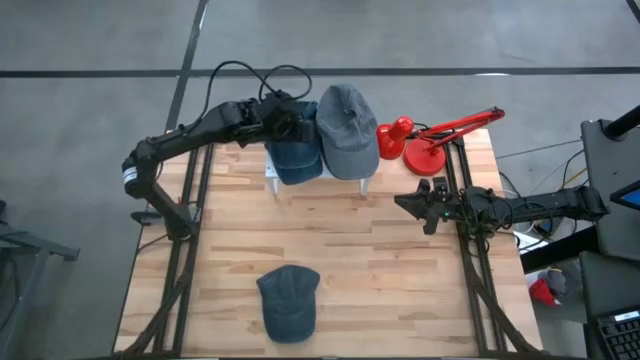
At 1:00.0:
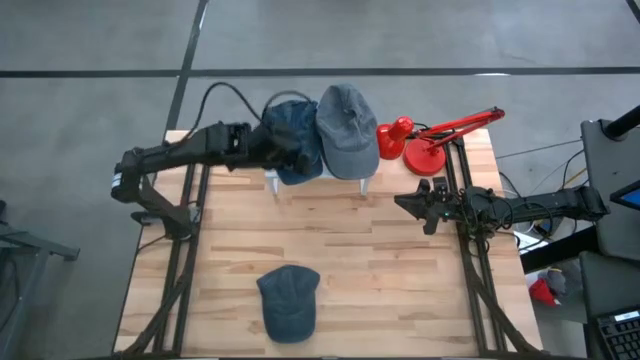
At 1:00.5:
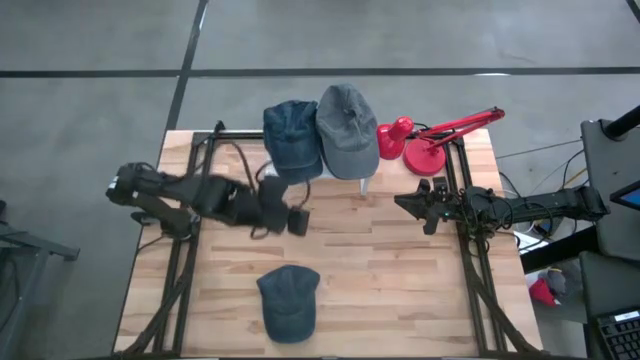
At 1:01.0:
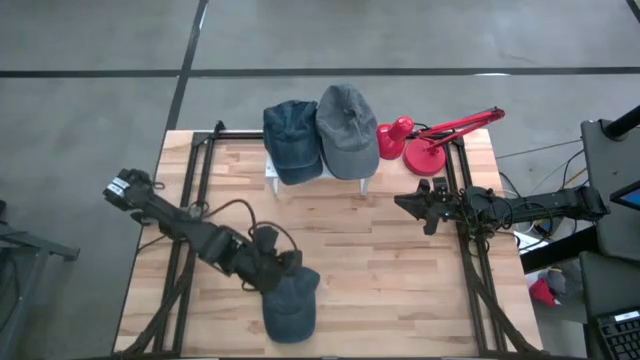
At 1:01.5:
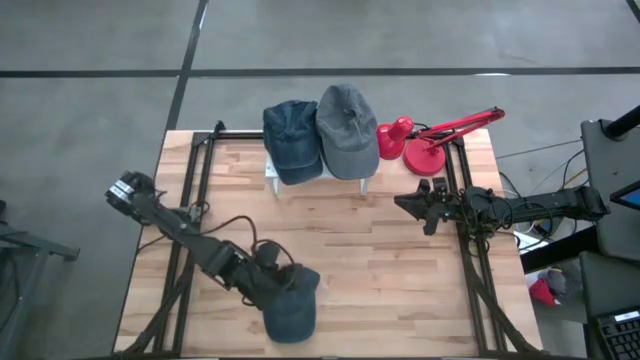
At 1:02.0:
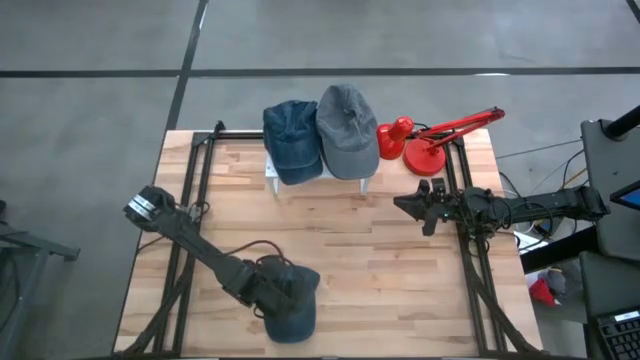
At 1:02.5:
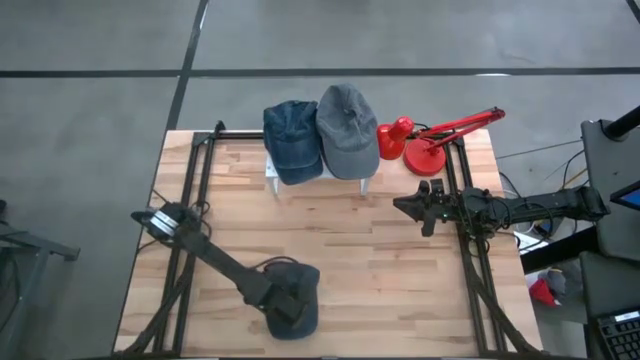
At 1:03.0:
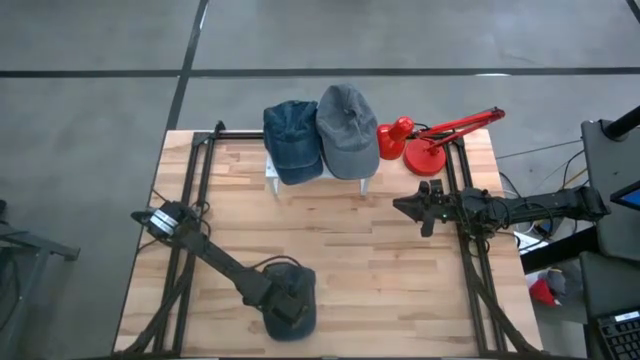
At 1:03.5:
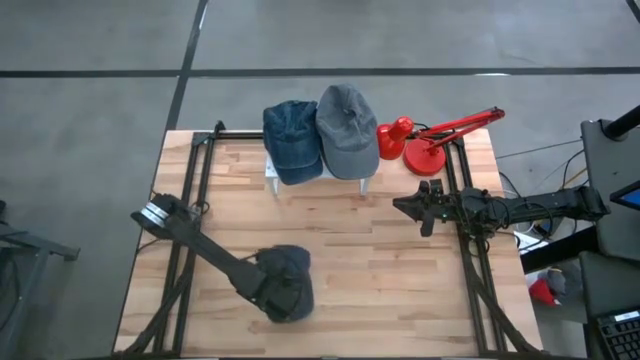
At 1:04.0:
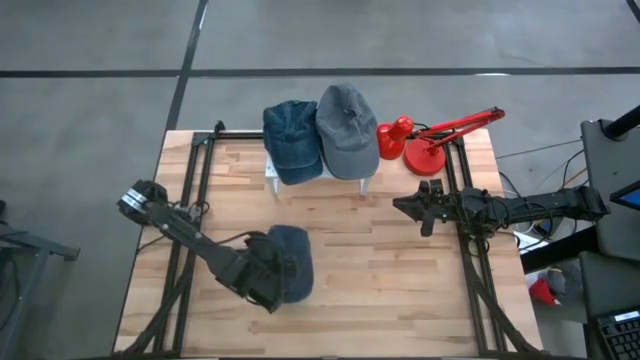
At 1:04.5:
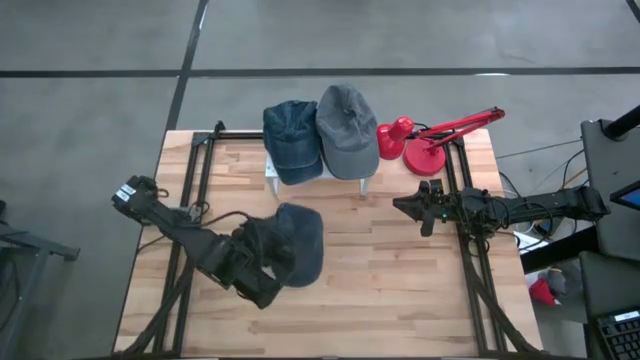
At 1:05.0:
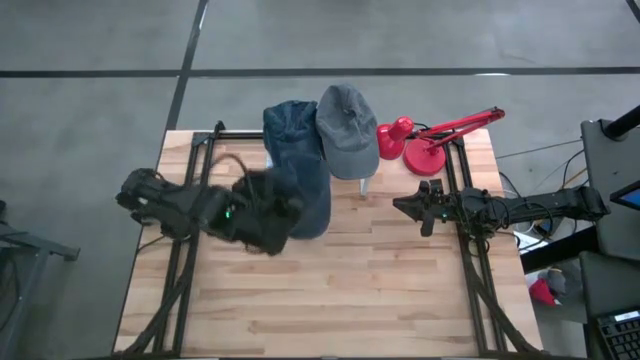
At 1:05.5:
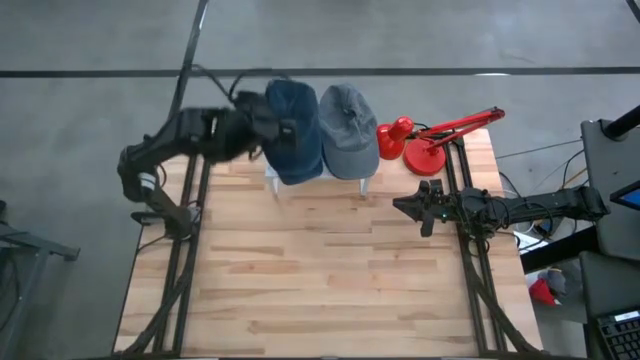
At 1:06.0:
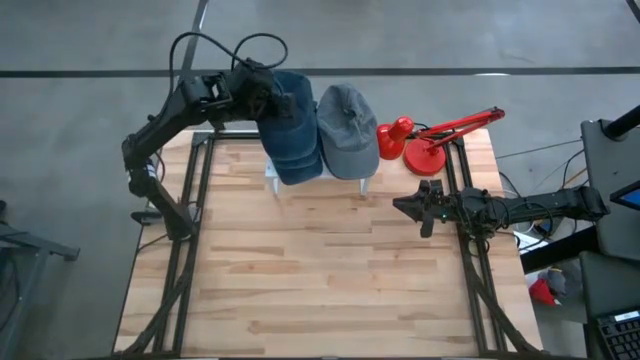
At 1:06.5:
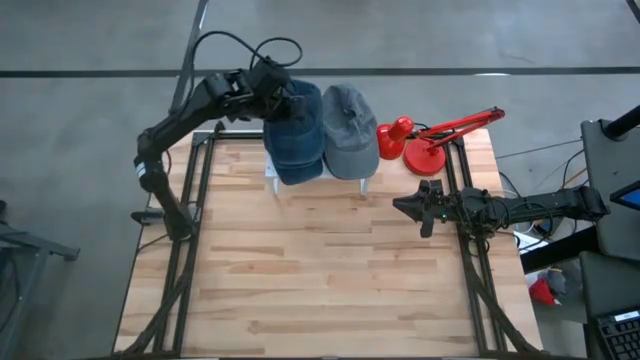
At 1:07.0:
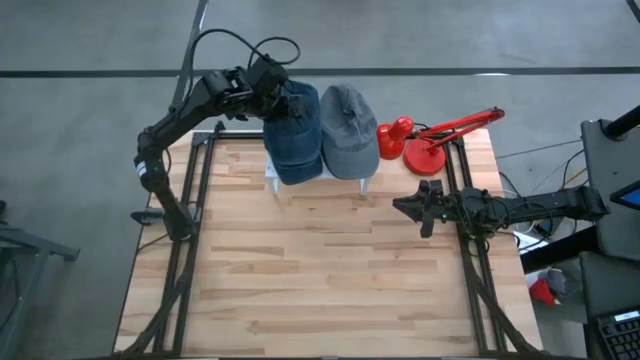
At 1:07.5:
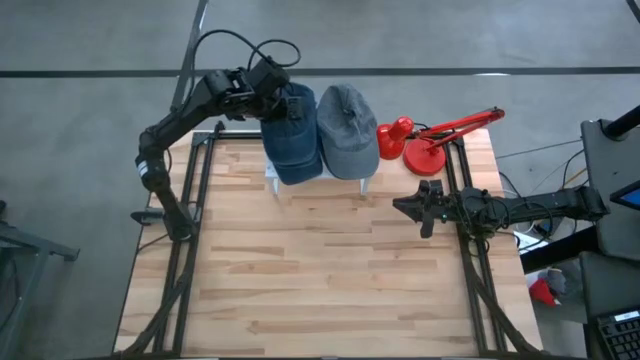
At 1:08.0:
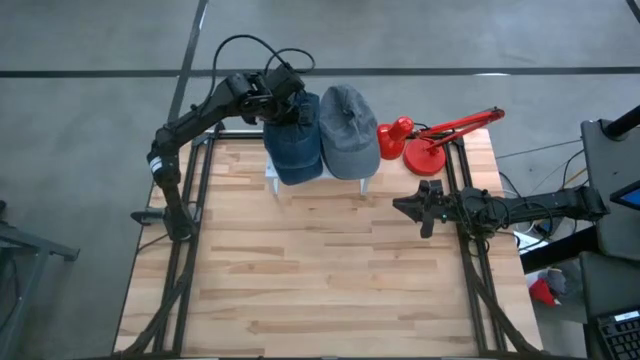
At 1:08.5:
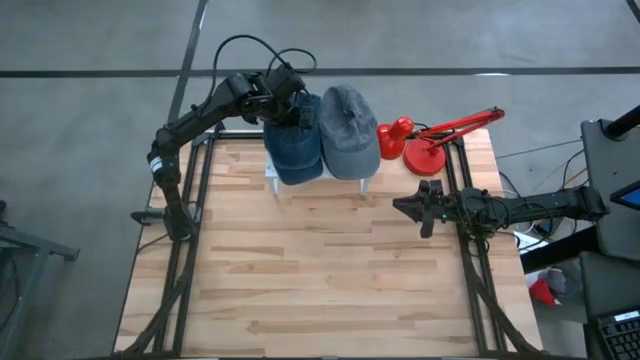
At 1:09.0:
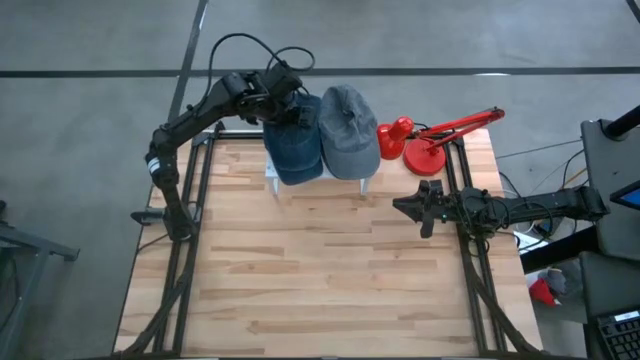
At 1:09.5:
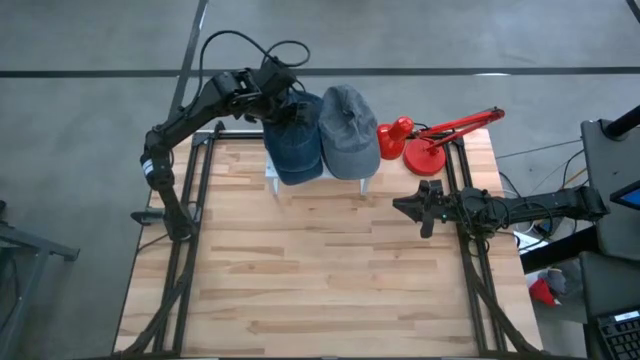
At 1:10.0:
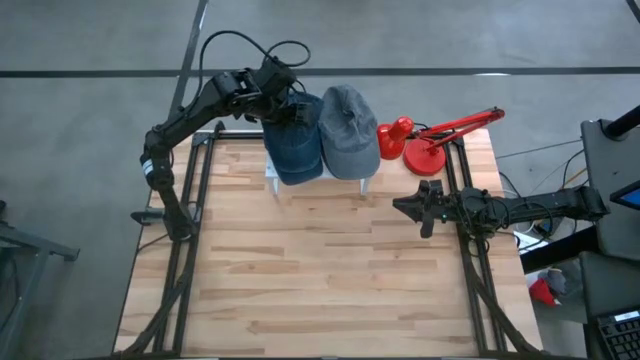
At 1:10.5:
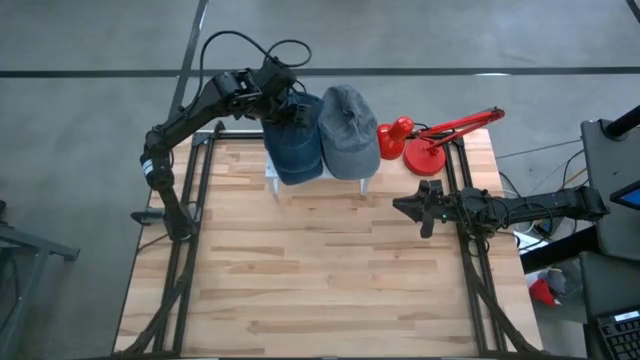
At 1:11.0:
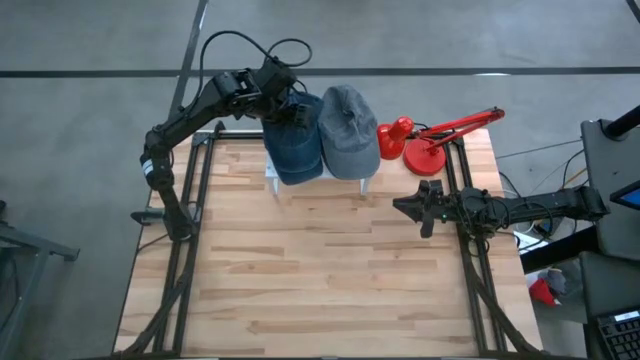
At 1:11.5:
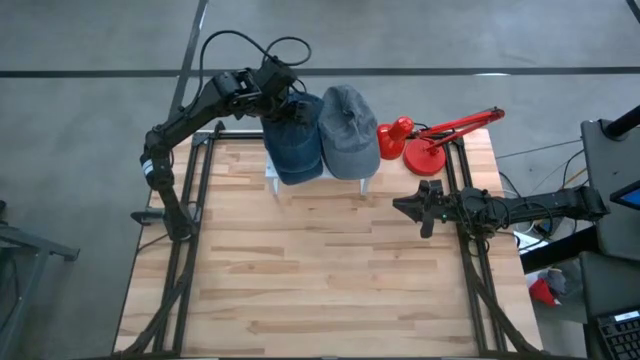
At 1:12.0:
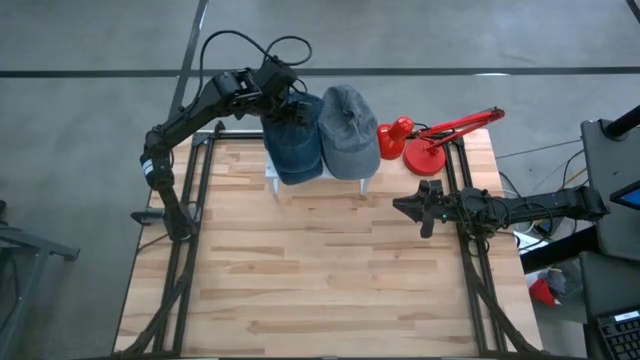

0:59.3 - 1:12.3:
Task: Pick & Place hat
Stack the blue cap on top of the other blue cap on the shelf

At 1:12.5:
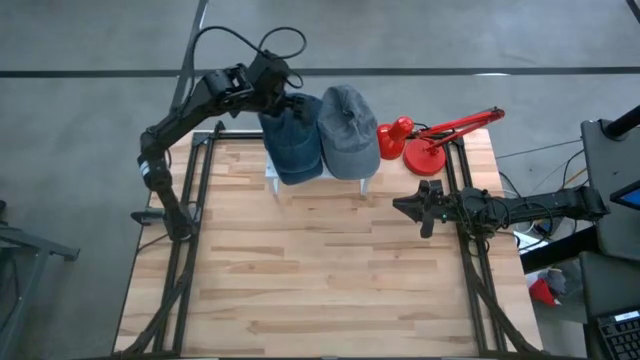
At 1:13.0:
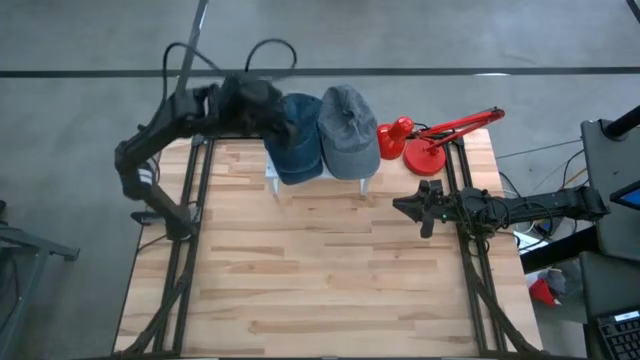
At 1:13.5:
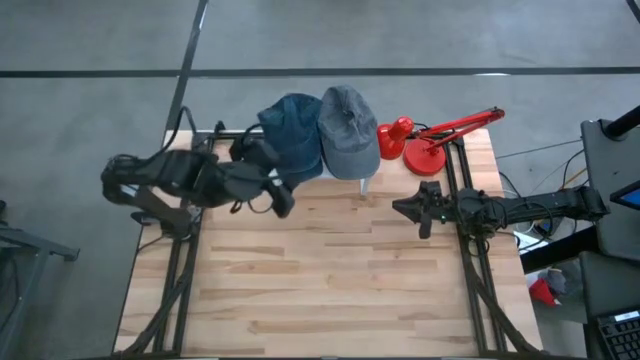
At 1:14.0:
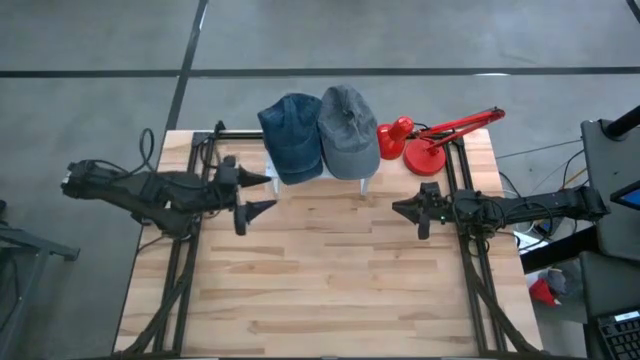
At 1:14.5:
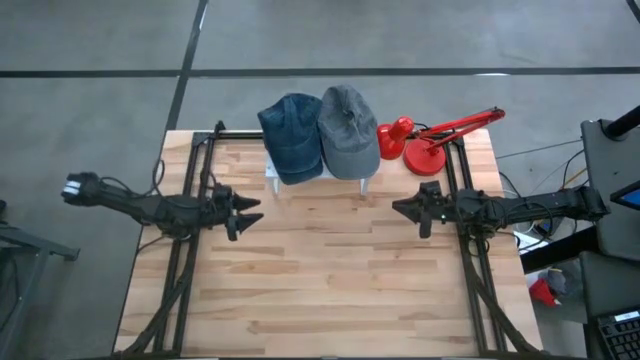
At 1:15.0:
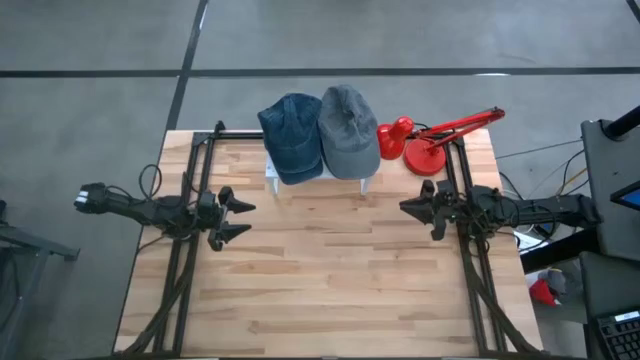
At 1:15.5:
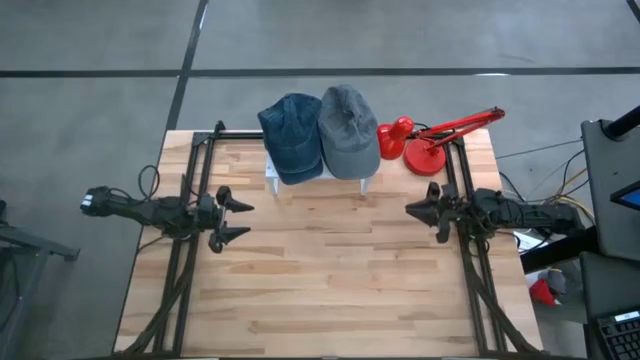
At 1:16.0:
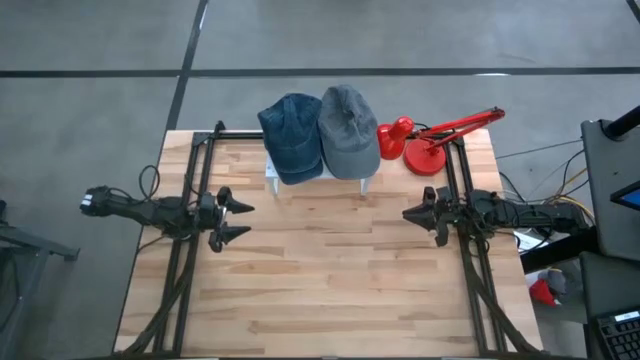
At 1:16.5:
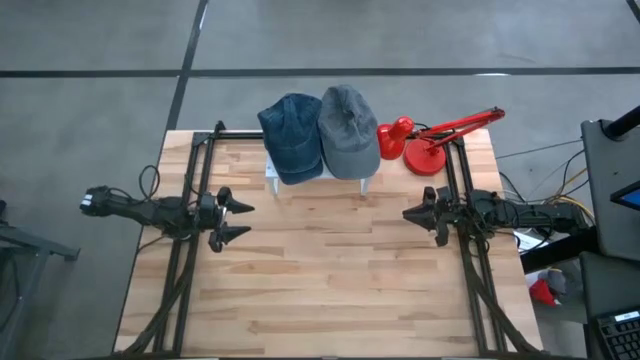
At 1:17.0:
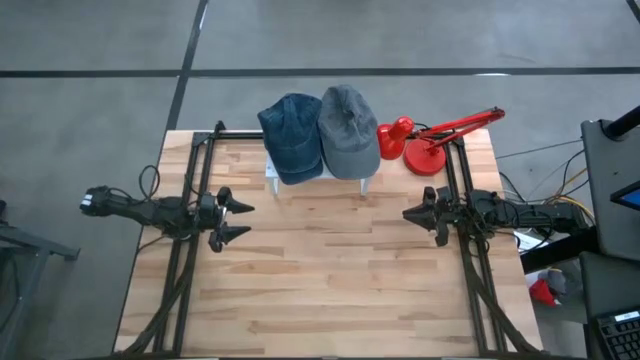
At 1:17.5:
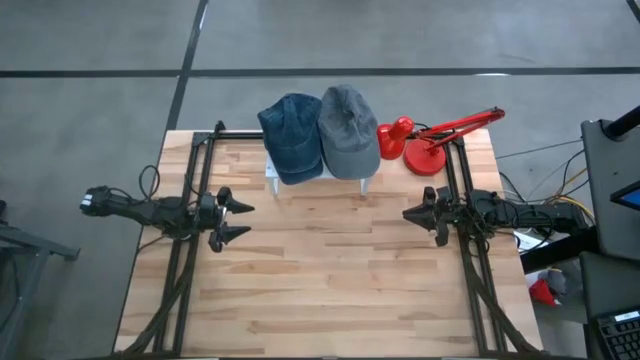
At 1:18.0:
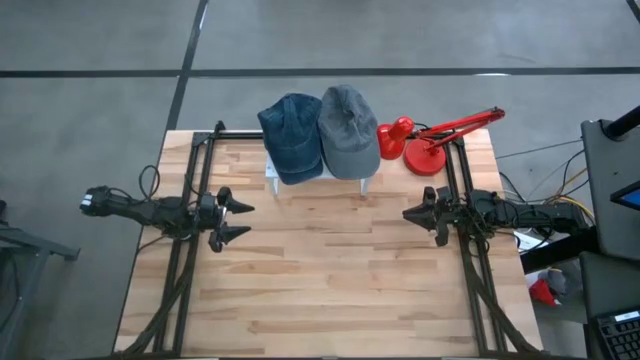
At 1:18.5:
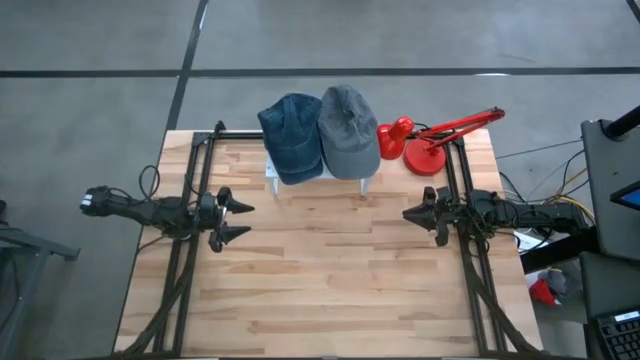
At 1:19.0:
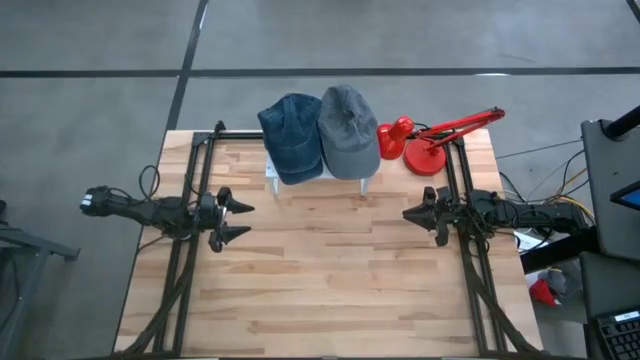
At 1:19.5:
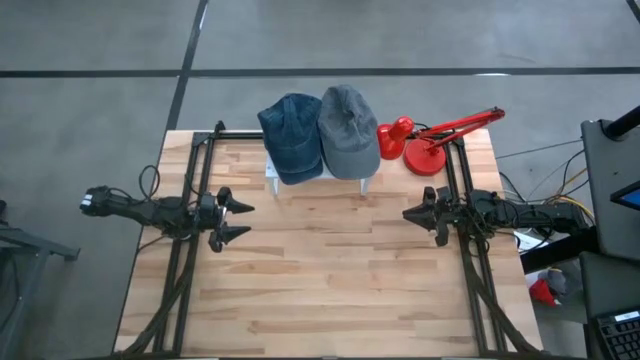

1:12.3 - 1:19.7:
Return to Home Position

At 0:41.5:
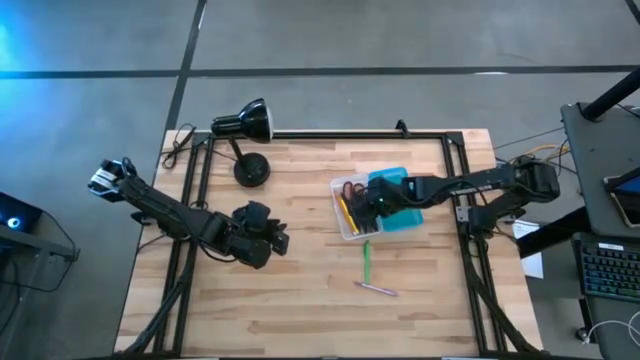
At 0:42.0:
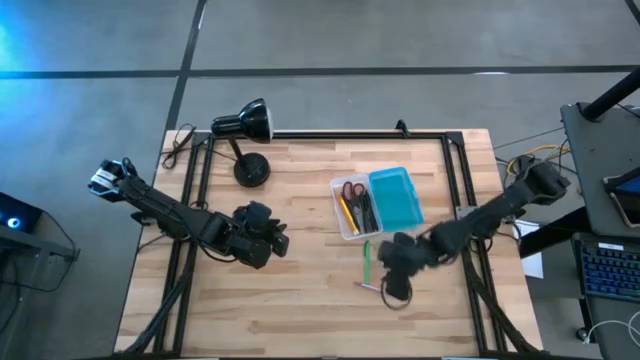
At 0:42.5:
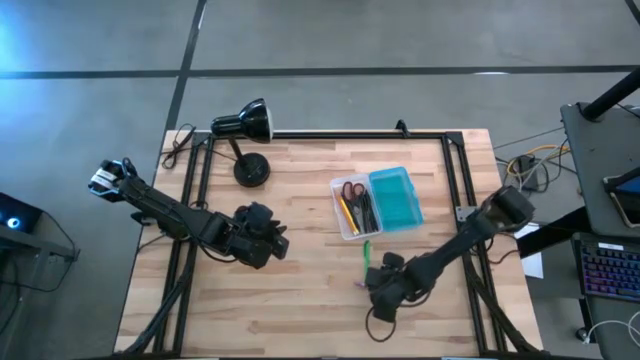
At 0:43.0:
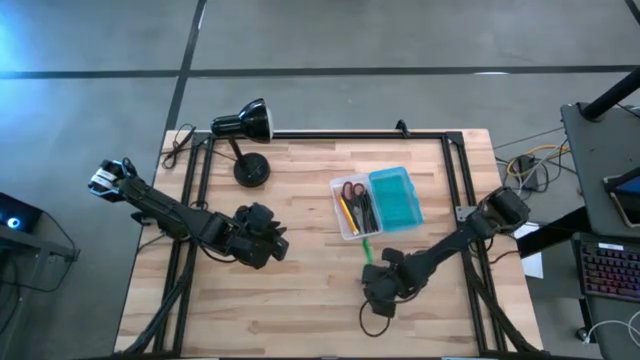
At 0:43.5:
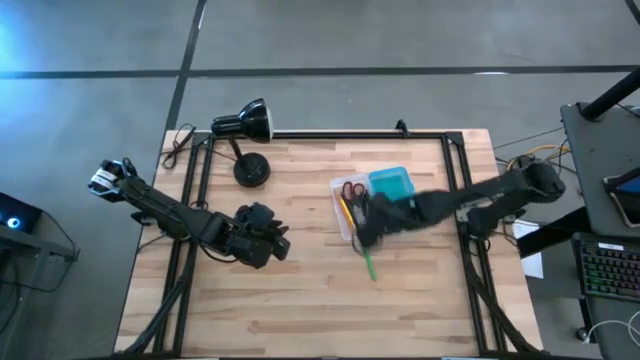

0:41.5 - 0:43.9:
Task: Pick & place school supplies into a supply box
Put the purple pen into the blue supply box
